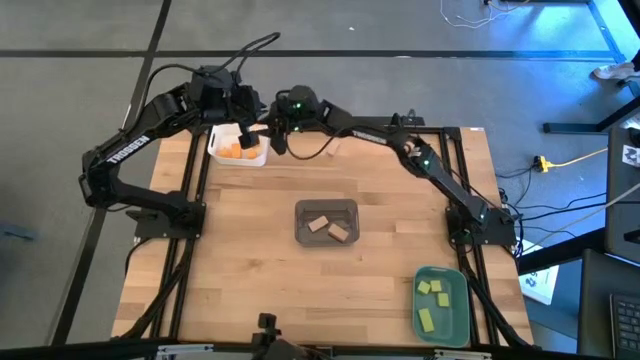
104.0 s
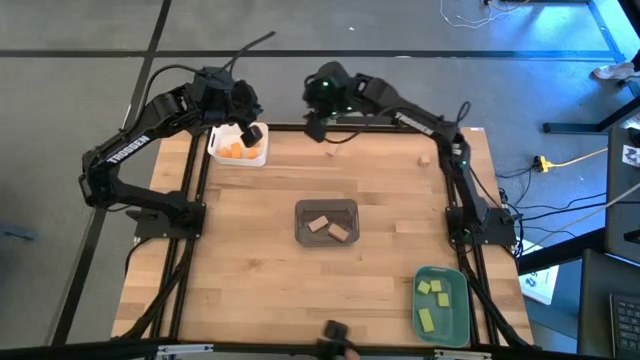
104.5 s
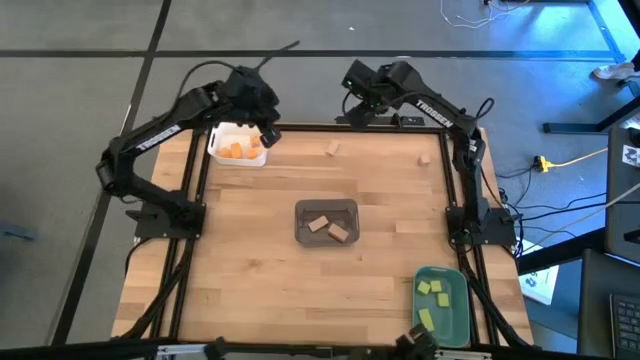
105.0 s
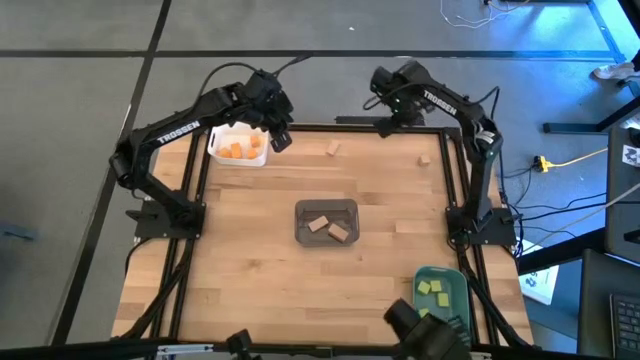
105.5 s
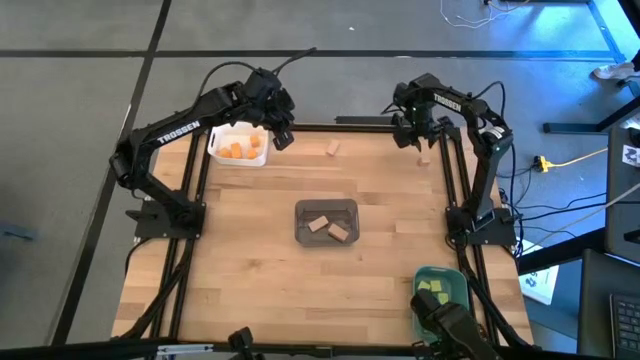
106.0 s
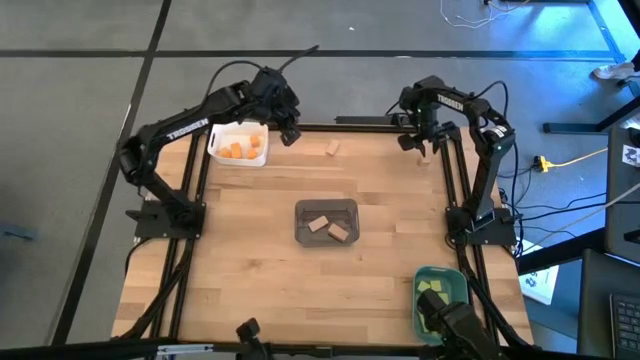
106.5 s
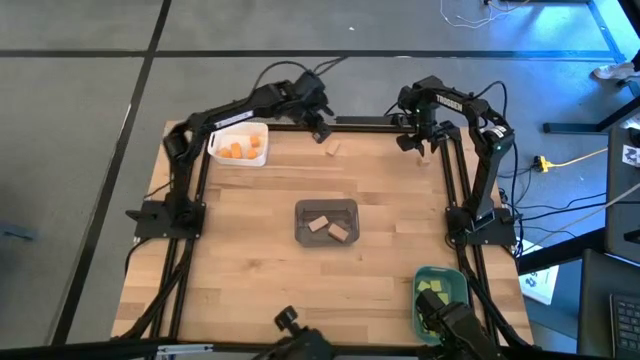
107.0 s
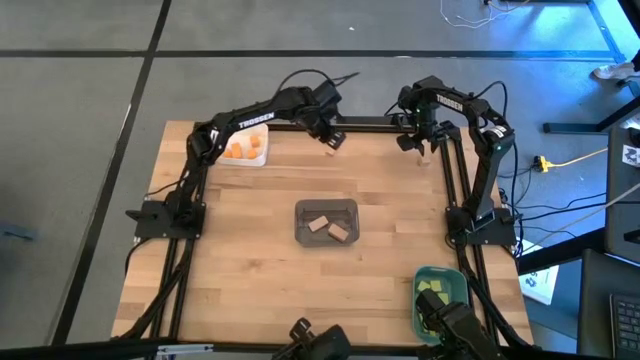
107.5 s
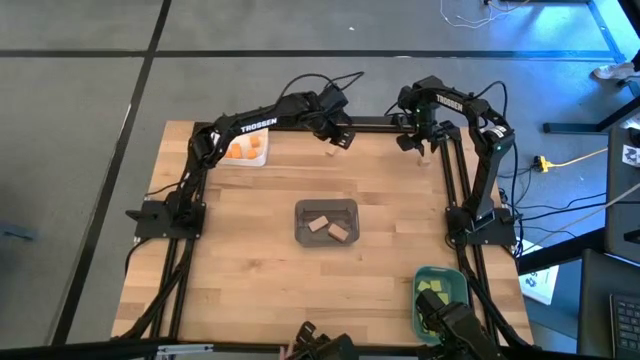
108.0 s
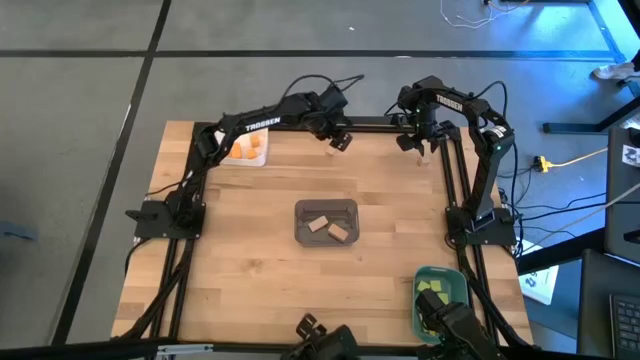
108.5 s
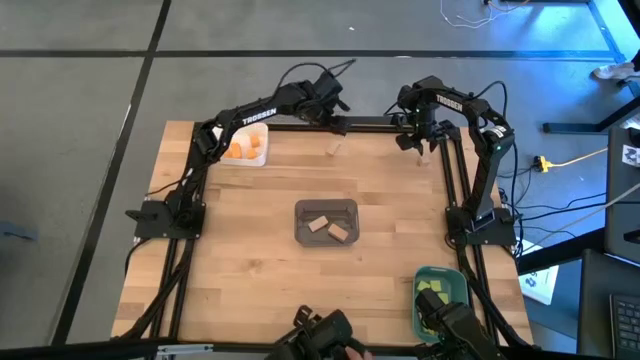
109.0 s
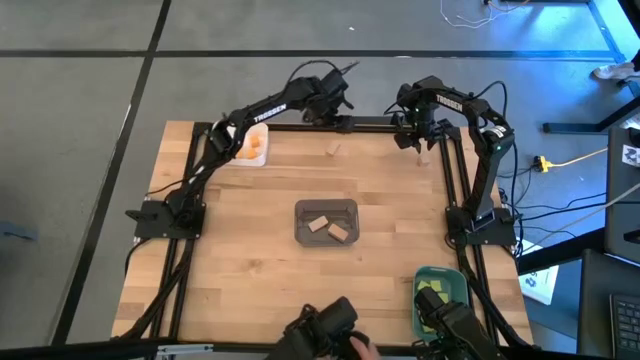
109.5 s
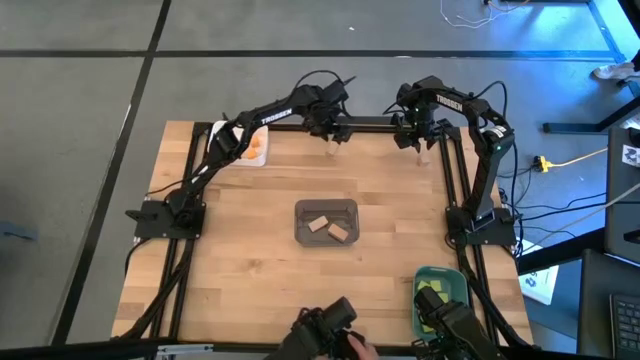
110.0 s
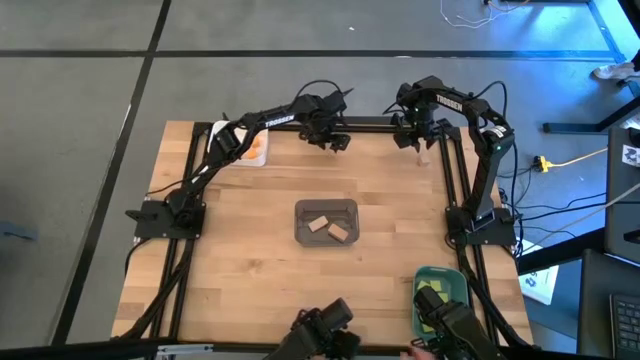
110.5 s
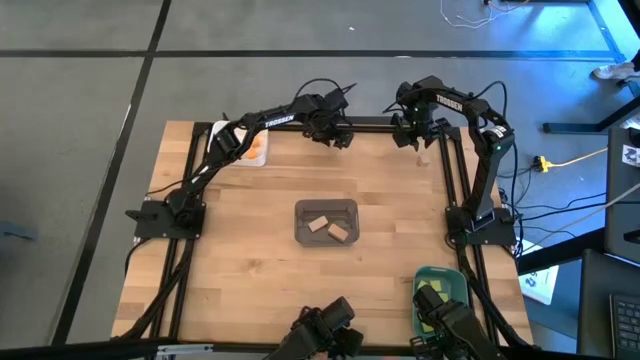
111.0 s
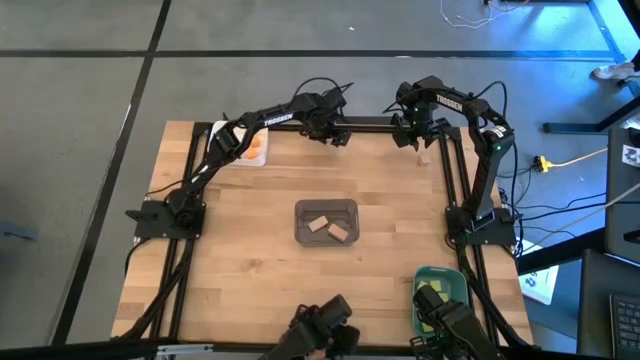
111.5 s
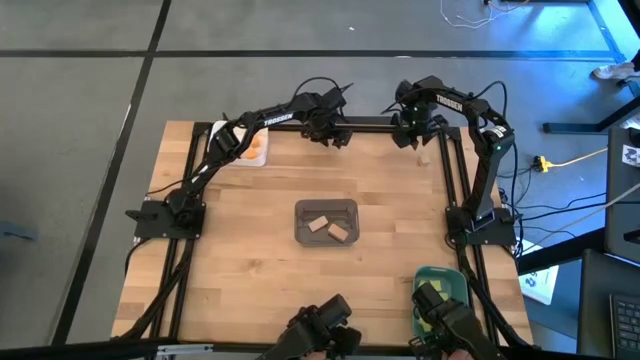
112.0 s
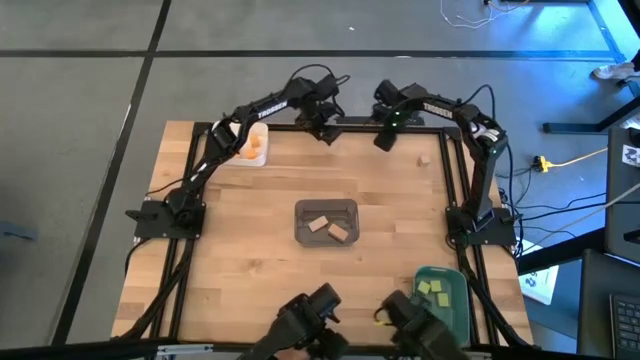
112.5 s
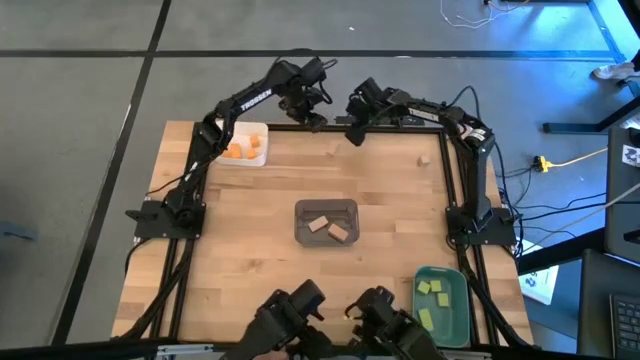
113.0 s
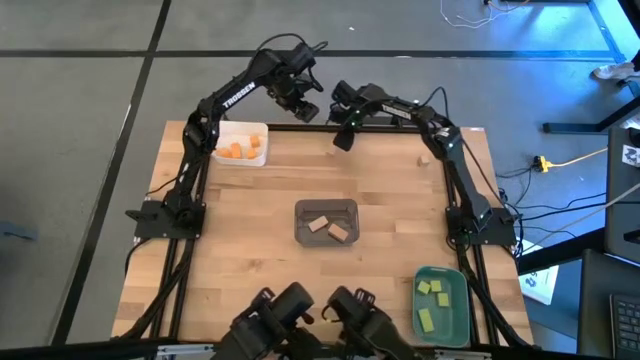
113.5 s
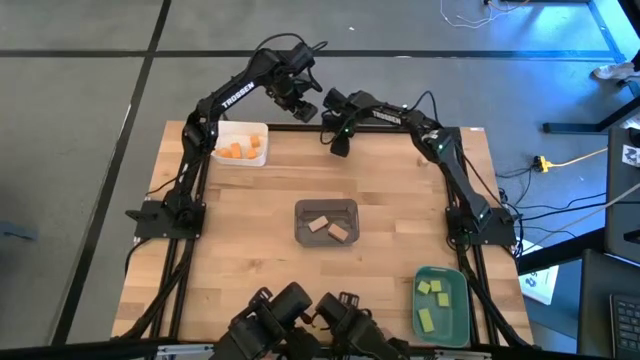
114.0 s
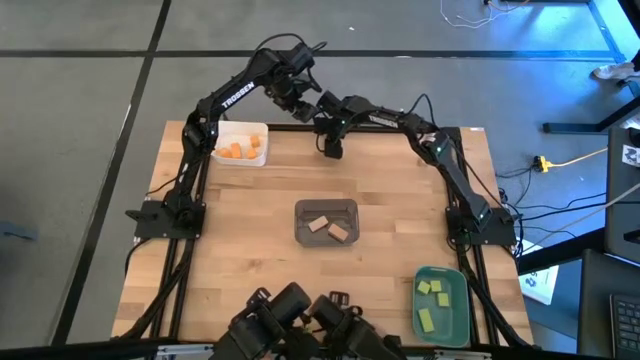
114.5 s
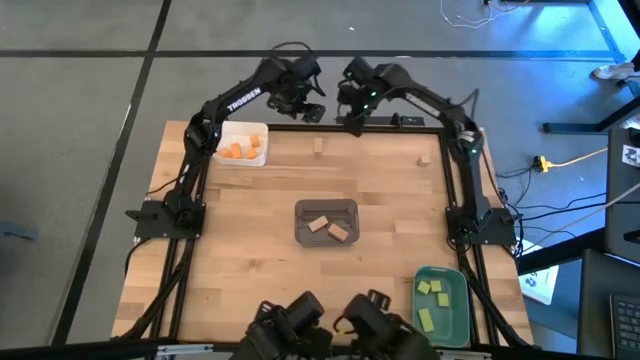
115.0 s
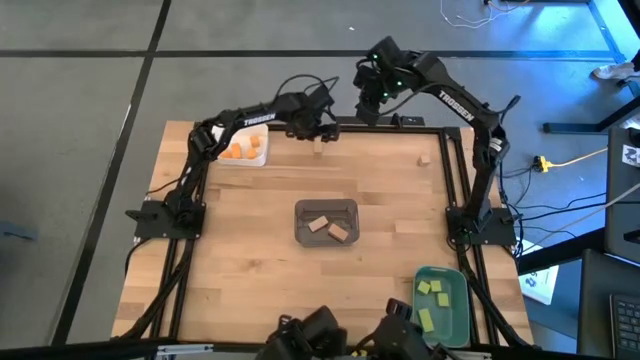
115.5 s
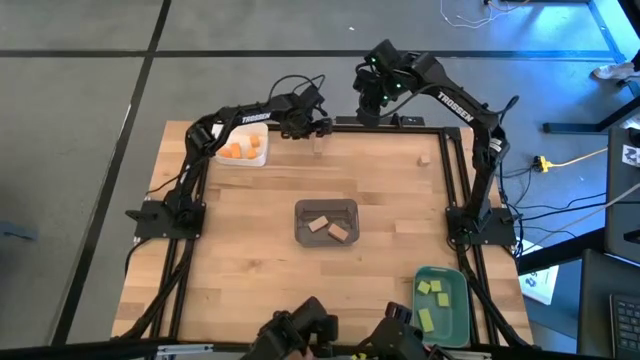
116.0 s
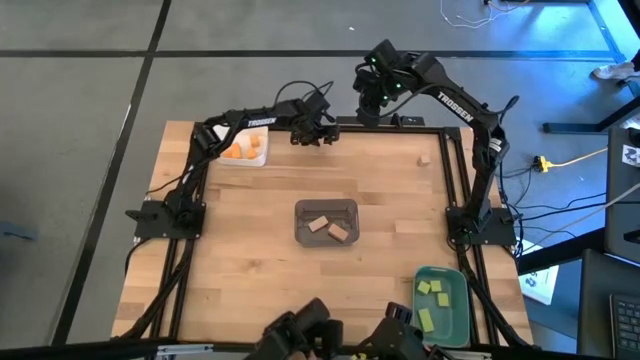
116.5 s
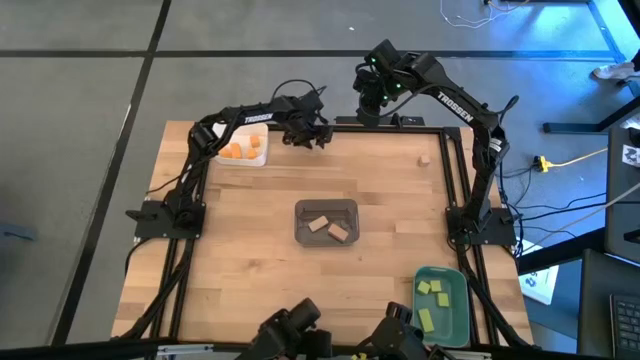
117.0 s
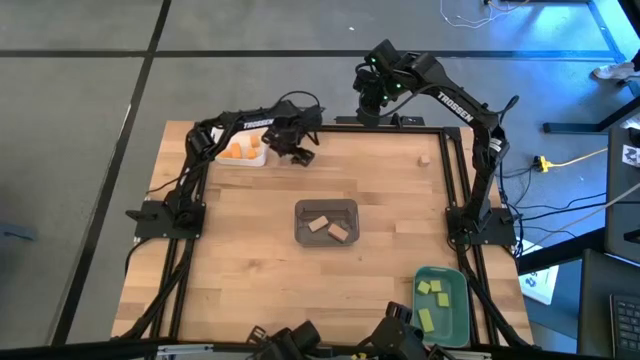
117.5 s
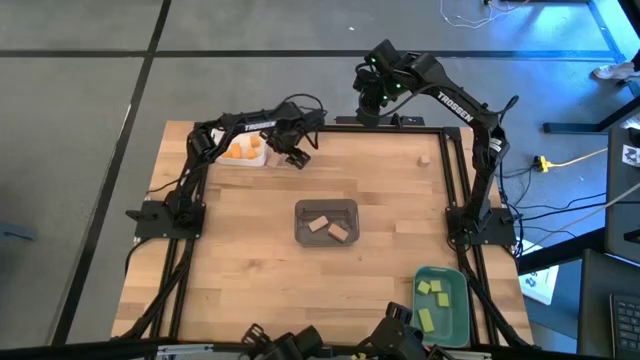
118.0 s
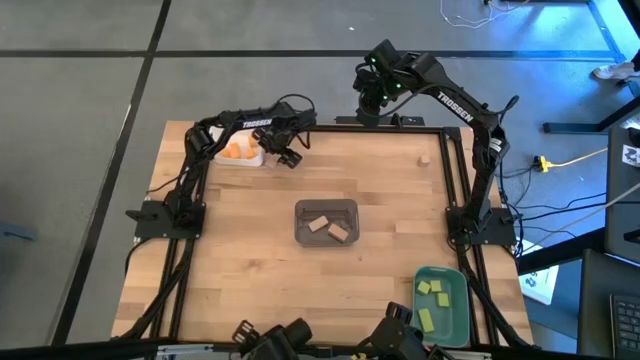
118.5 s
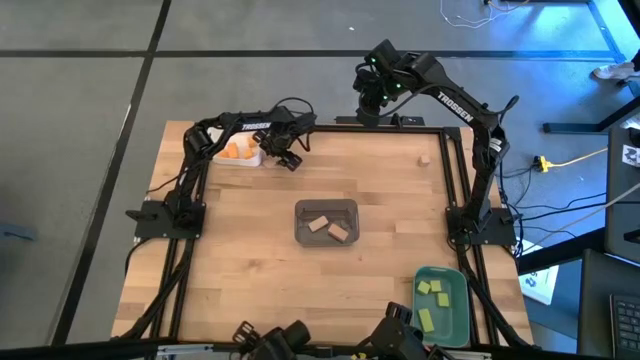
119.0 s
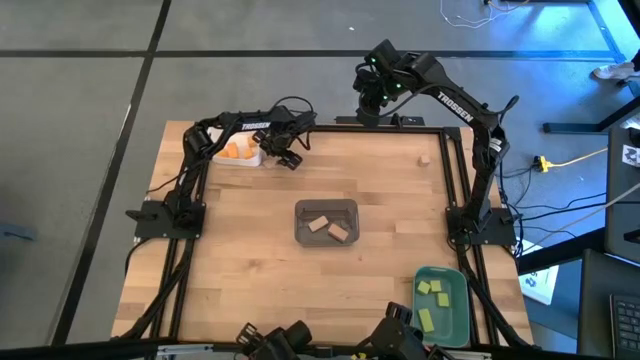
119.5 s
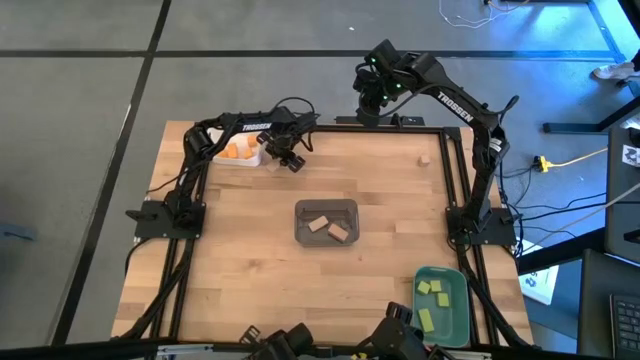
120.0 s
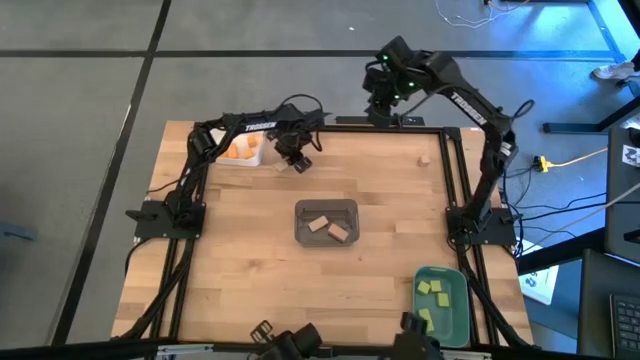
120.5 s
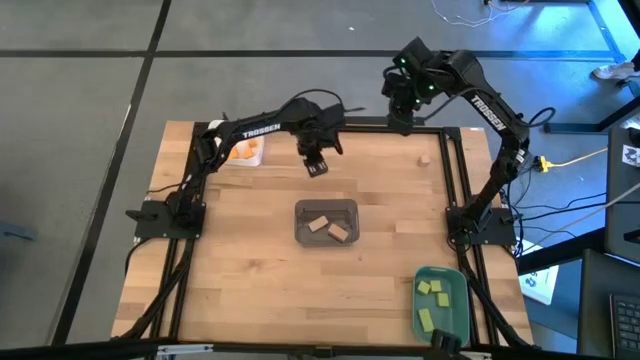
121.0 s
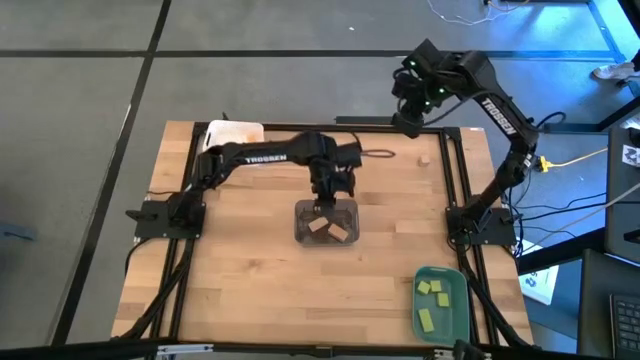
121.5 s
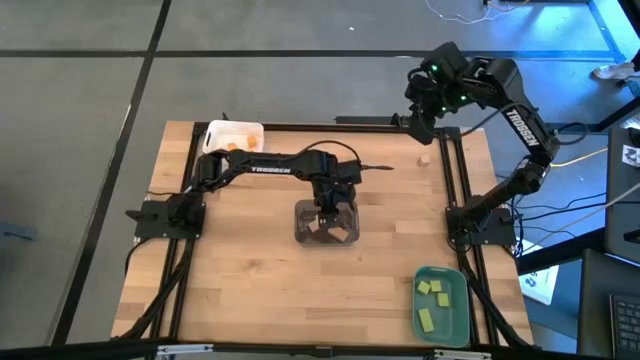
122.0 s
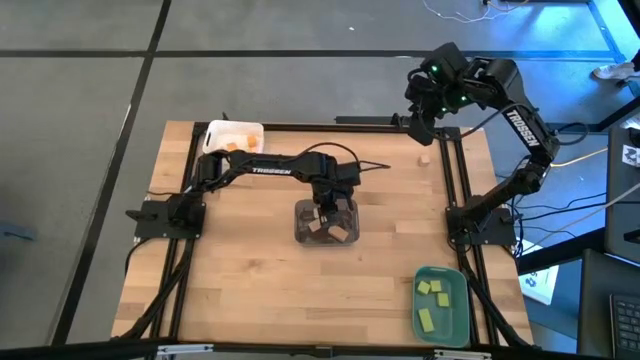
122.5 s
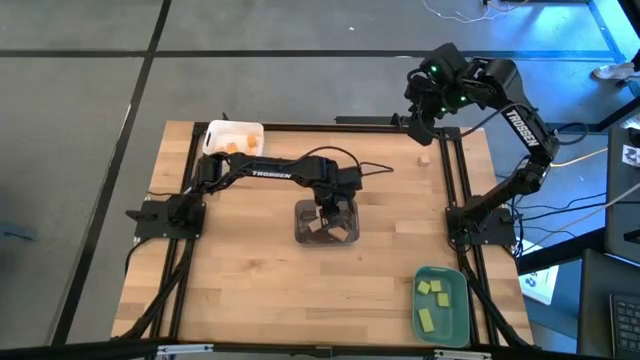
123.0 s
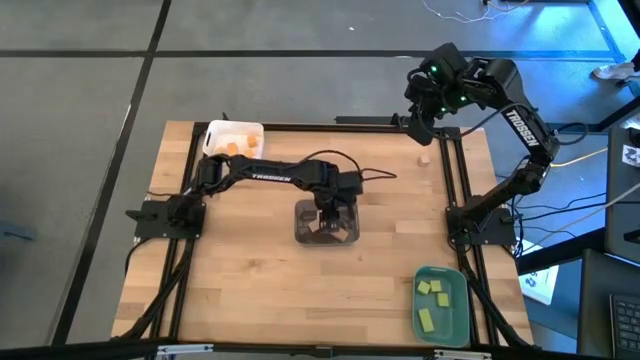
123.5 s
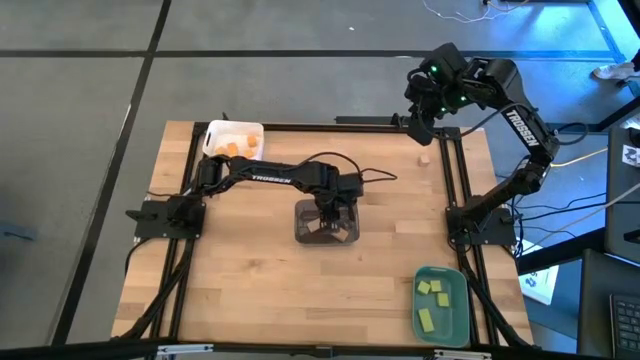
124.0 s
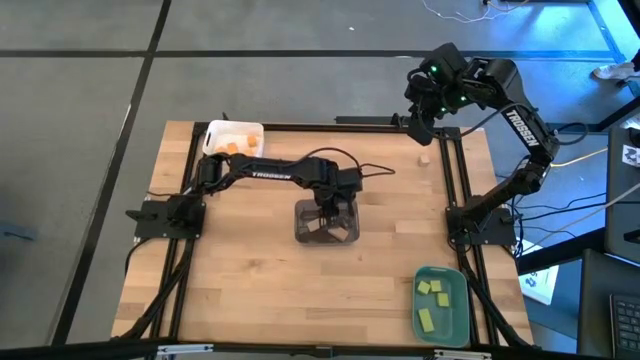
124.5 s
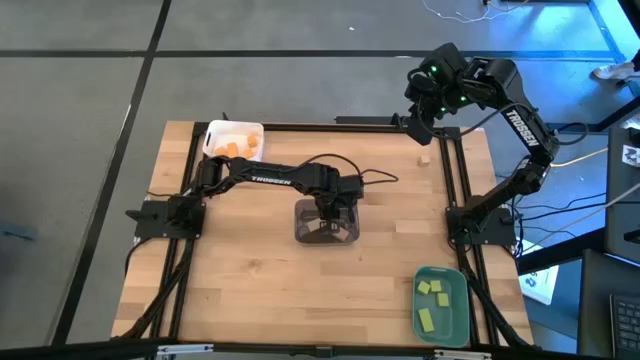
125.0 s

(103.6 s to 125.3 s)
Task: Sort & place blocks by color
Put the brown block into the black bin

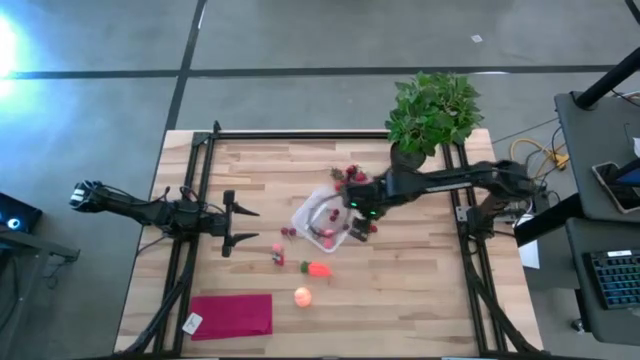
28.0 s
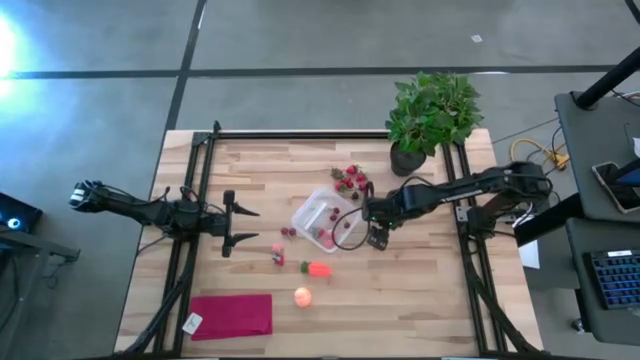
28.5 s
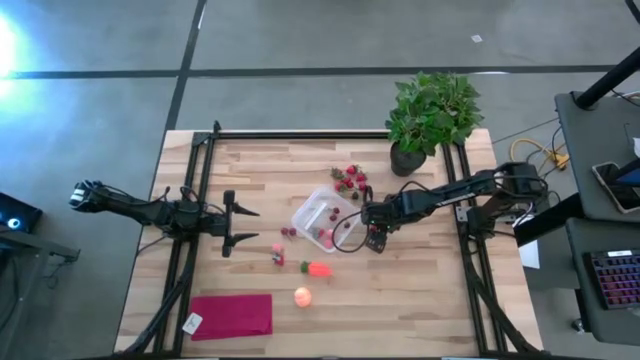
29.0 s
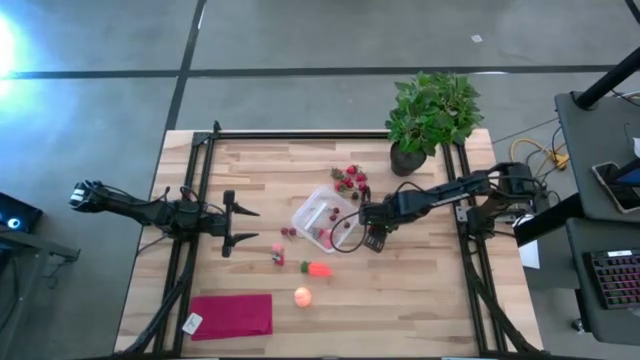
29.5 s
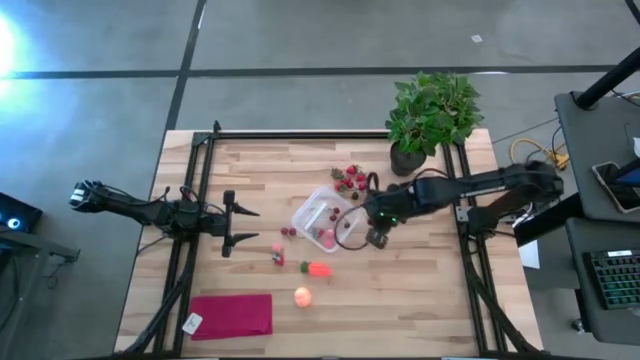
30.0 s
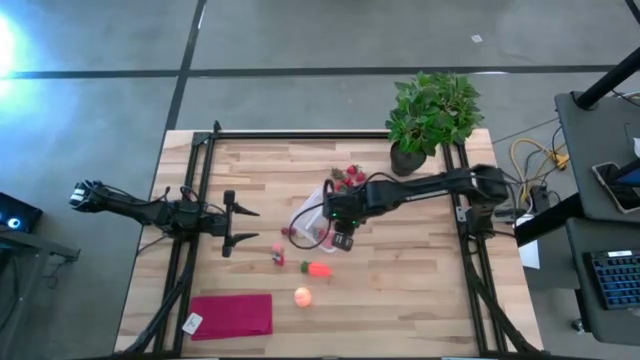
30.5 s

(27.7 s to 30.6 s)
Task: Pick and placing Produce into tupperware
Put the red cherry into the transparent container
